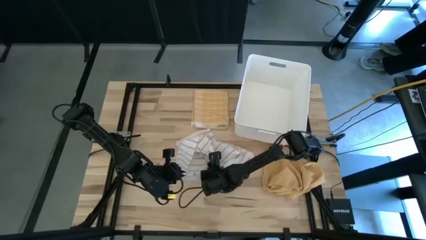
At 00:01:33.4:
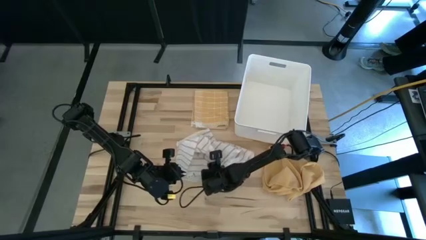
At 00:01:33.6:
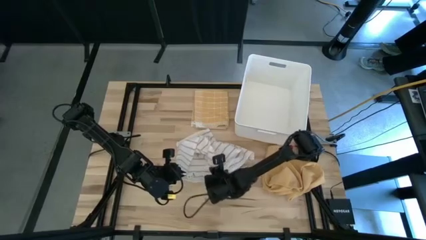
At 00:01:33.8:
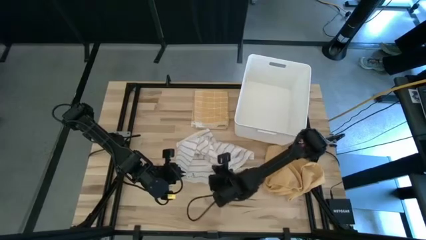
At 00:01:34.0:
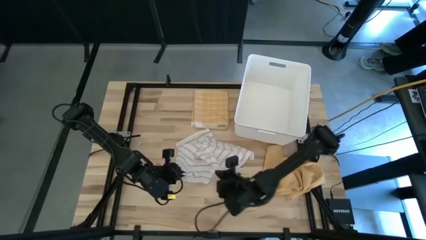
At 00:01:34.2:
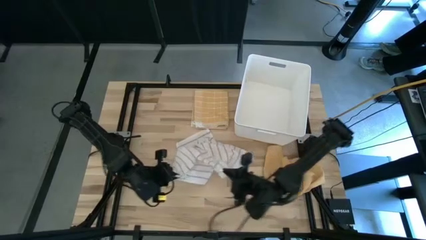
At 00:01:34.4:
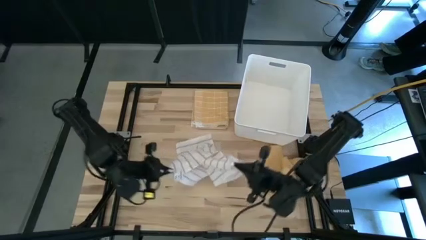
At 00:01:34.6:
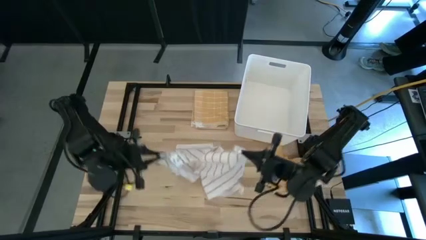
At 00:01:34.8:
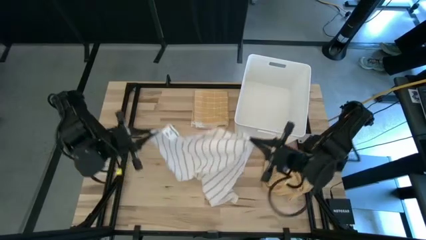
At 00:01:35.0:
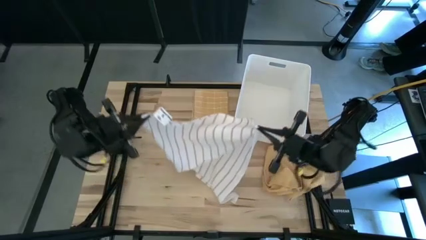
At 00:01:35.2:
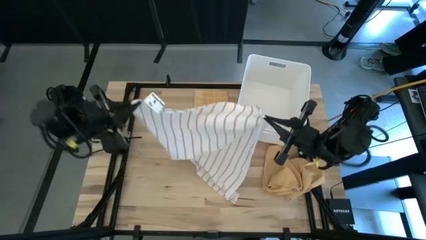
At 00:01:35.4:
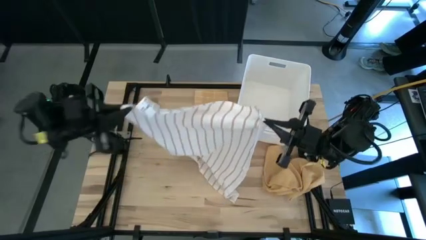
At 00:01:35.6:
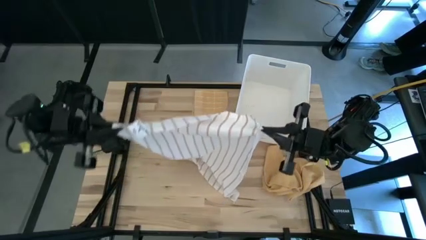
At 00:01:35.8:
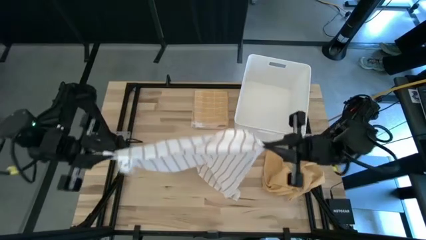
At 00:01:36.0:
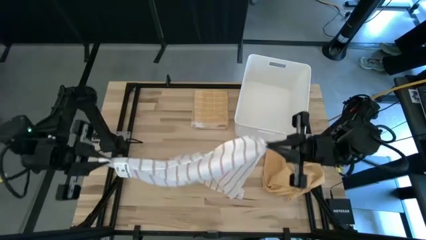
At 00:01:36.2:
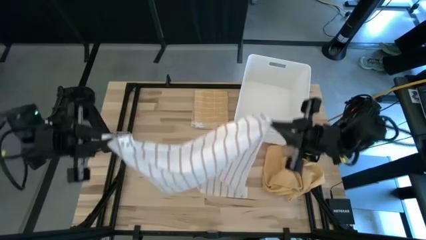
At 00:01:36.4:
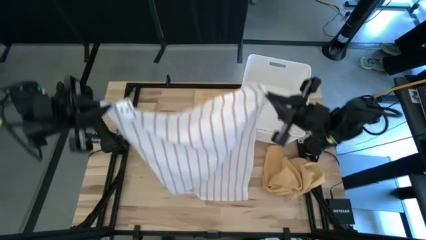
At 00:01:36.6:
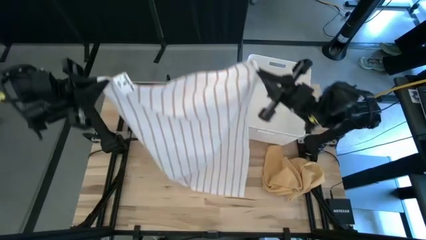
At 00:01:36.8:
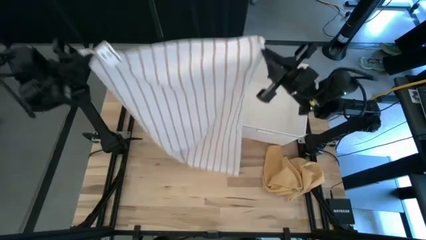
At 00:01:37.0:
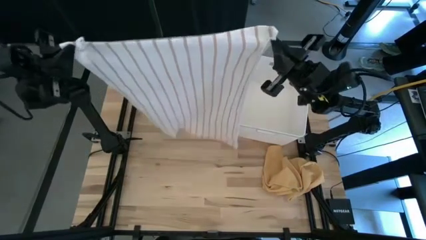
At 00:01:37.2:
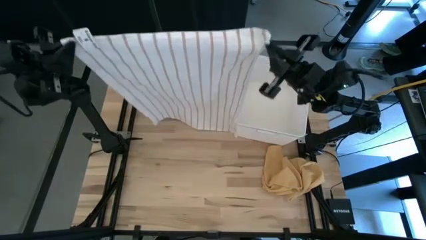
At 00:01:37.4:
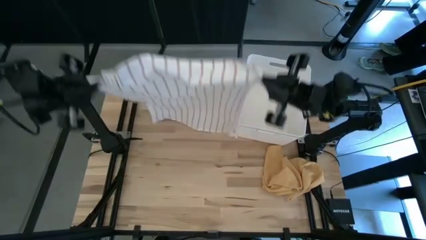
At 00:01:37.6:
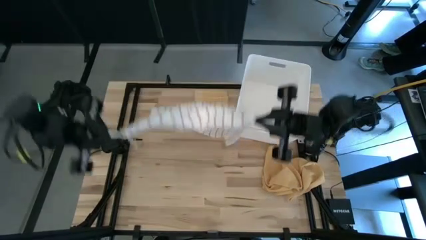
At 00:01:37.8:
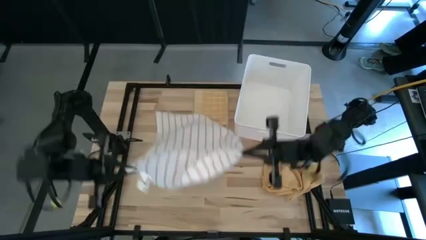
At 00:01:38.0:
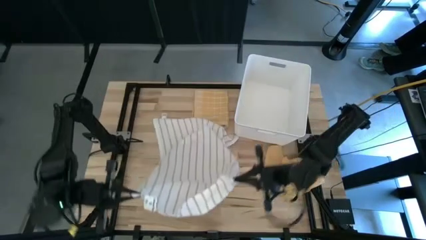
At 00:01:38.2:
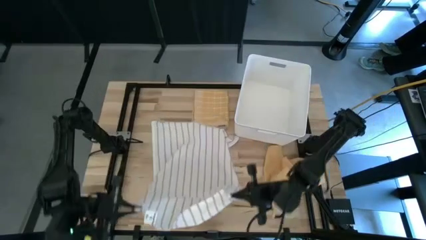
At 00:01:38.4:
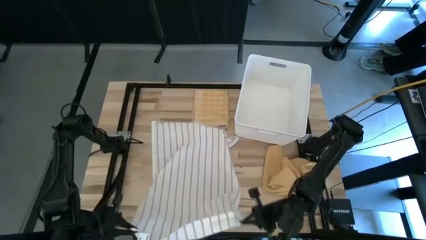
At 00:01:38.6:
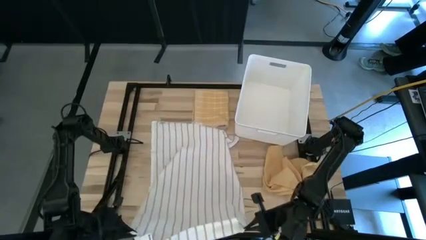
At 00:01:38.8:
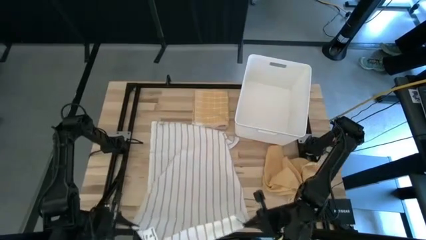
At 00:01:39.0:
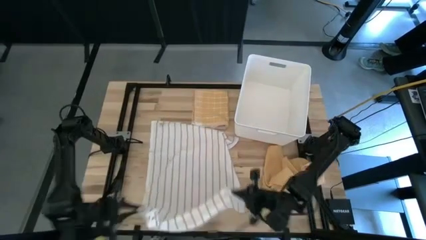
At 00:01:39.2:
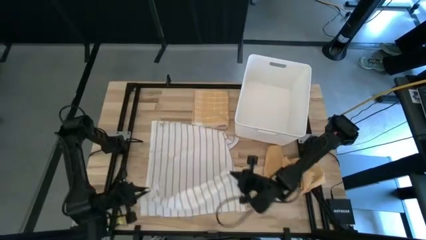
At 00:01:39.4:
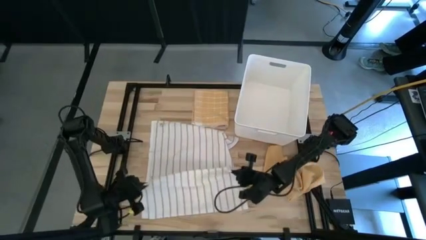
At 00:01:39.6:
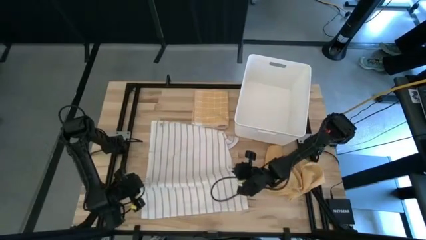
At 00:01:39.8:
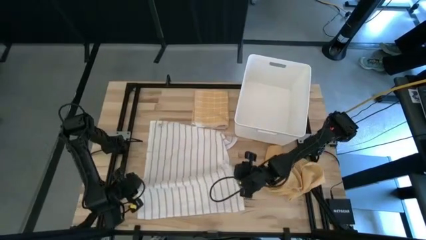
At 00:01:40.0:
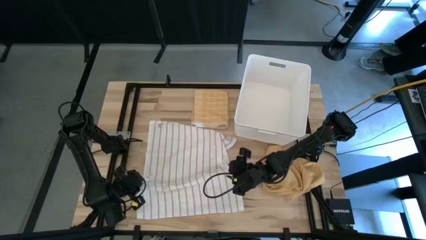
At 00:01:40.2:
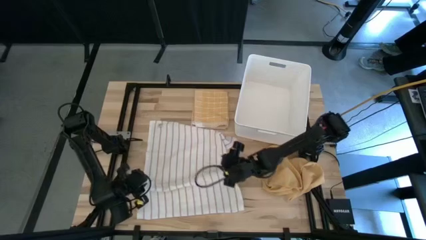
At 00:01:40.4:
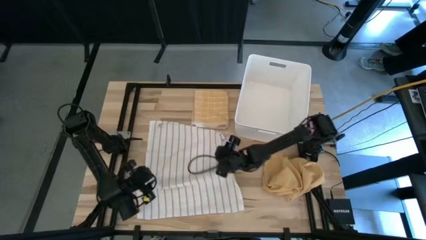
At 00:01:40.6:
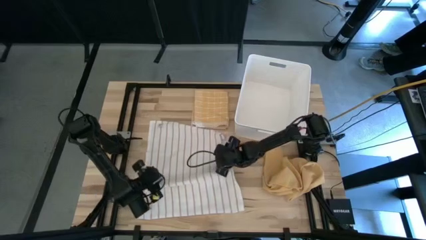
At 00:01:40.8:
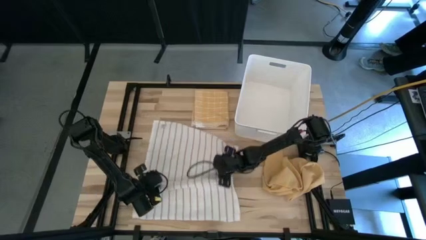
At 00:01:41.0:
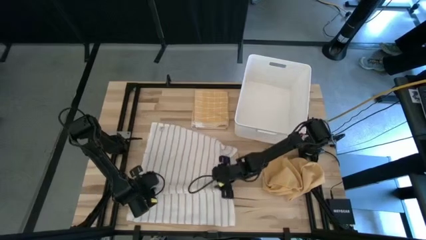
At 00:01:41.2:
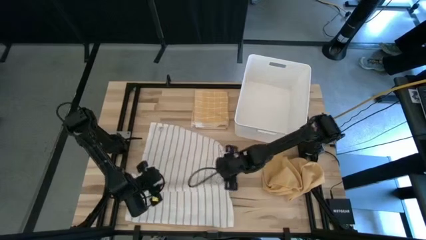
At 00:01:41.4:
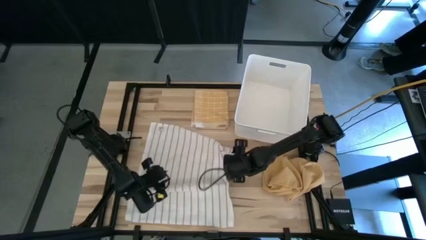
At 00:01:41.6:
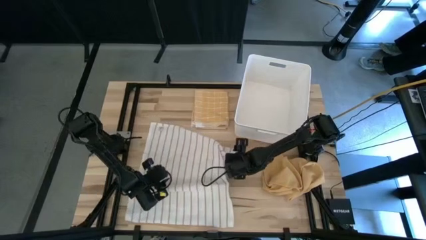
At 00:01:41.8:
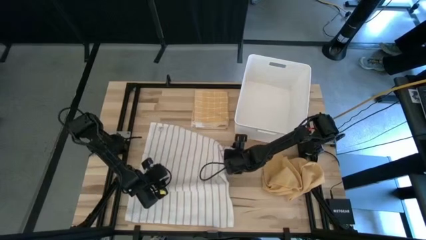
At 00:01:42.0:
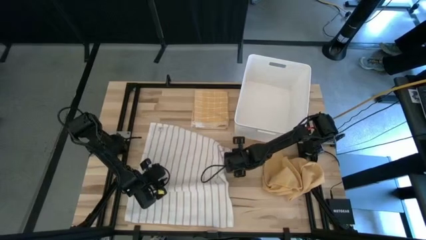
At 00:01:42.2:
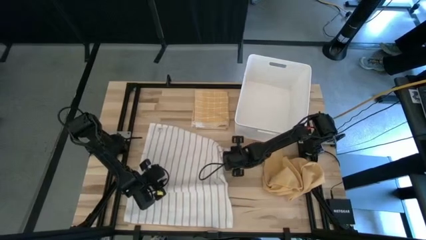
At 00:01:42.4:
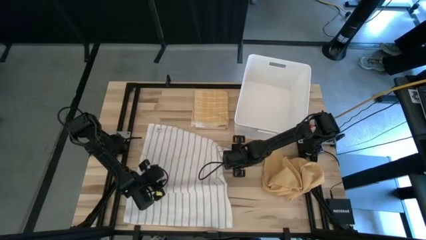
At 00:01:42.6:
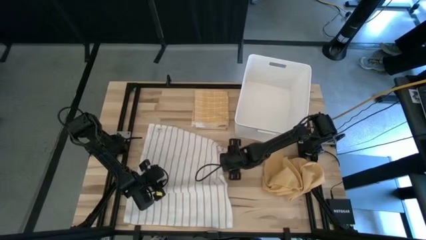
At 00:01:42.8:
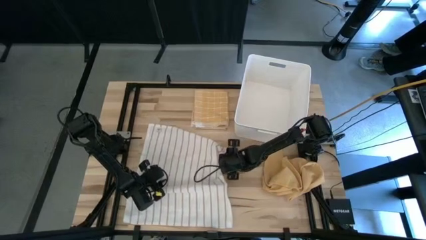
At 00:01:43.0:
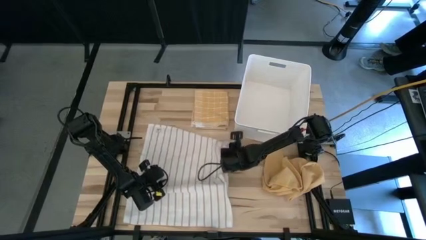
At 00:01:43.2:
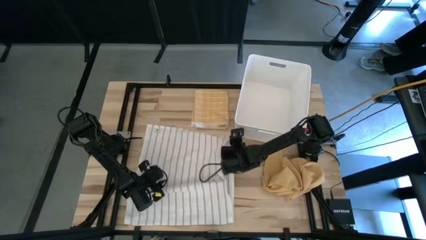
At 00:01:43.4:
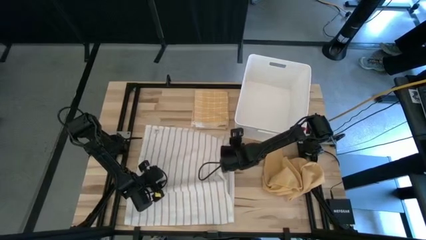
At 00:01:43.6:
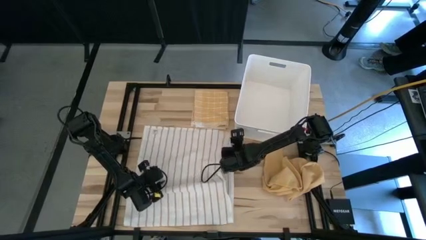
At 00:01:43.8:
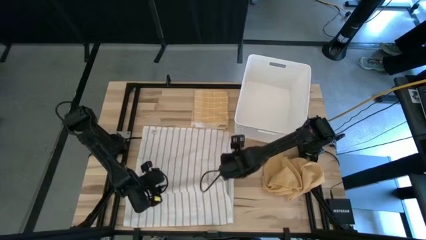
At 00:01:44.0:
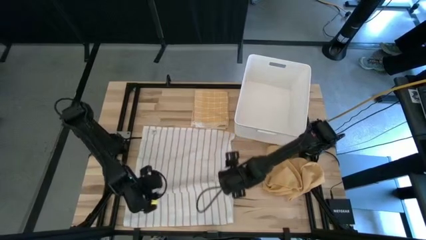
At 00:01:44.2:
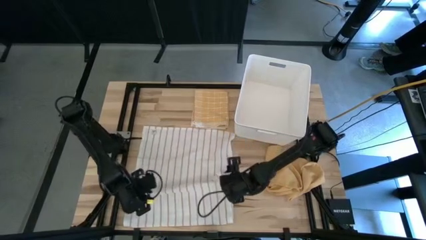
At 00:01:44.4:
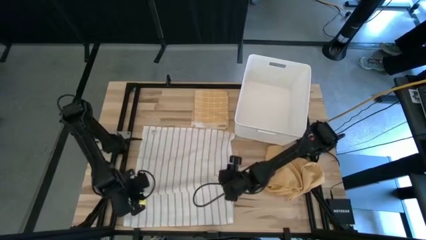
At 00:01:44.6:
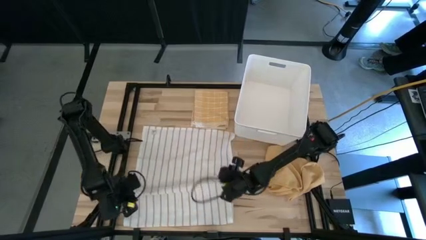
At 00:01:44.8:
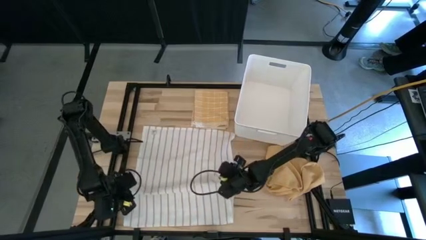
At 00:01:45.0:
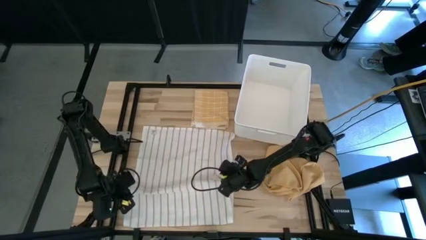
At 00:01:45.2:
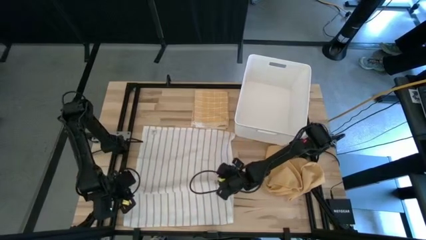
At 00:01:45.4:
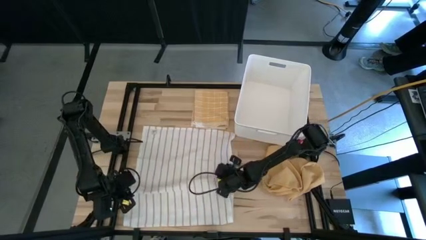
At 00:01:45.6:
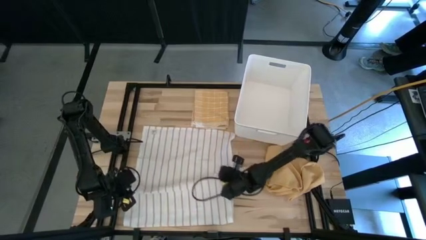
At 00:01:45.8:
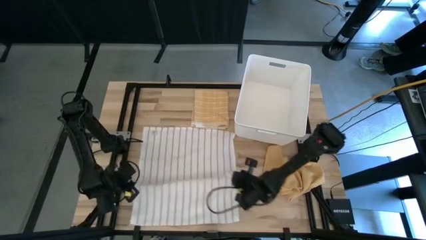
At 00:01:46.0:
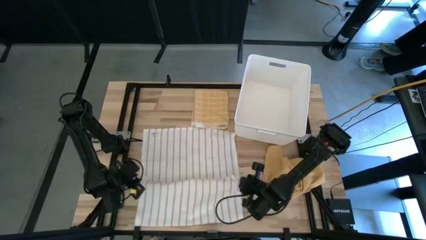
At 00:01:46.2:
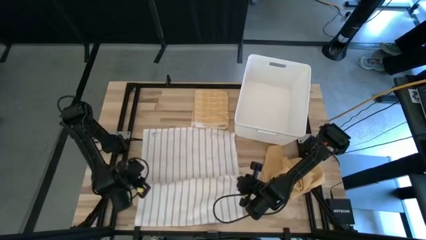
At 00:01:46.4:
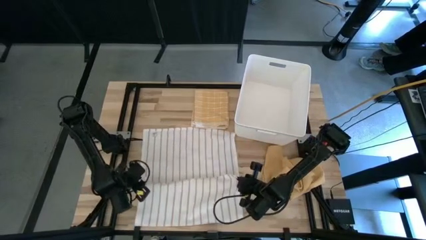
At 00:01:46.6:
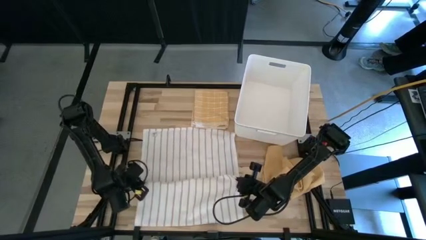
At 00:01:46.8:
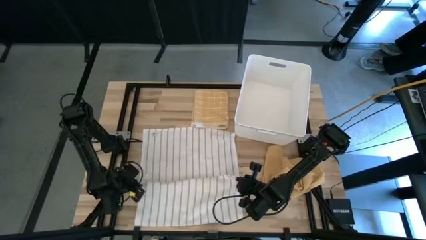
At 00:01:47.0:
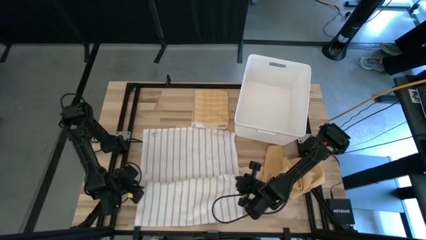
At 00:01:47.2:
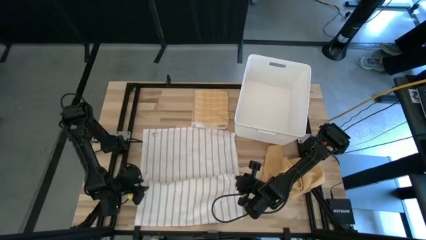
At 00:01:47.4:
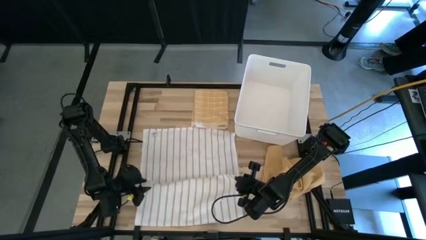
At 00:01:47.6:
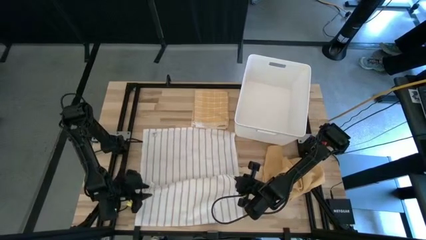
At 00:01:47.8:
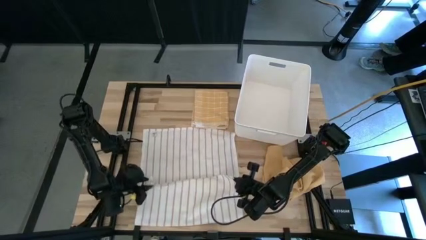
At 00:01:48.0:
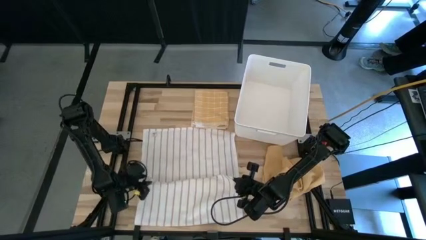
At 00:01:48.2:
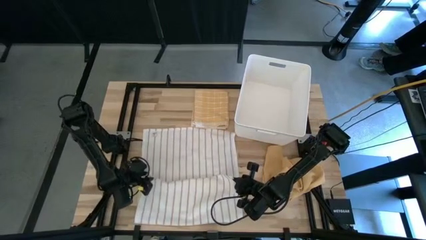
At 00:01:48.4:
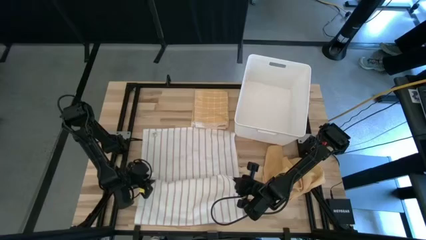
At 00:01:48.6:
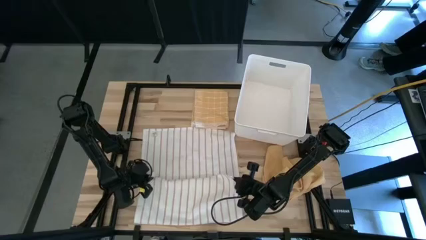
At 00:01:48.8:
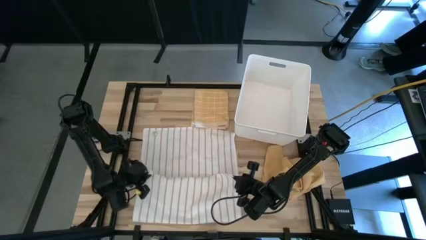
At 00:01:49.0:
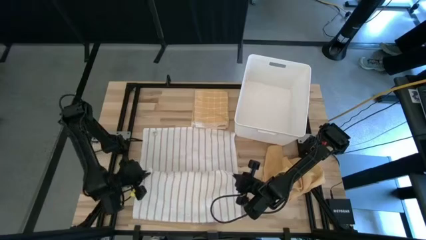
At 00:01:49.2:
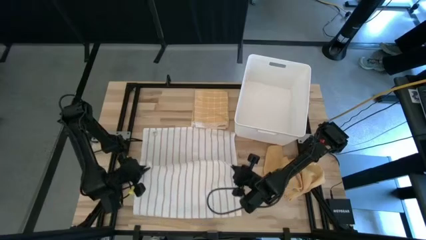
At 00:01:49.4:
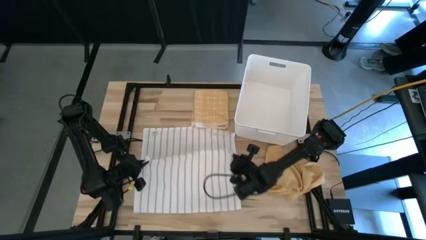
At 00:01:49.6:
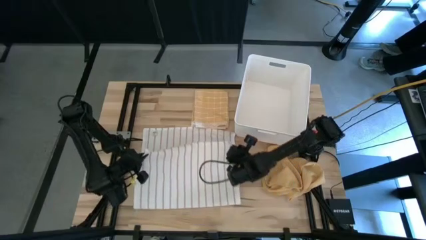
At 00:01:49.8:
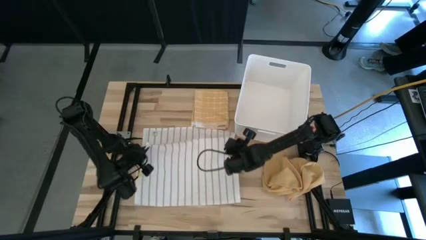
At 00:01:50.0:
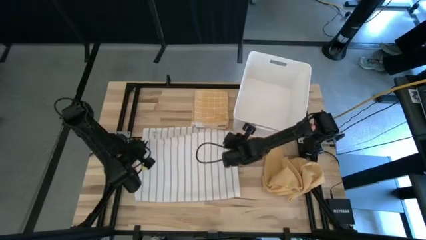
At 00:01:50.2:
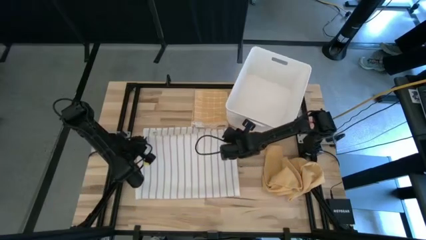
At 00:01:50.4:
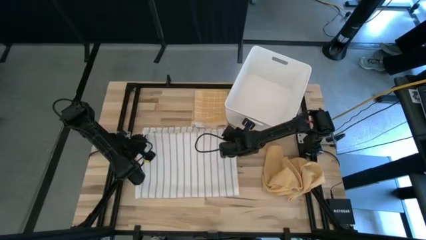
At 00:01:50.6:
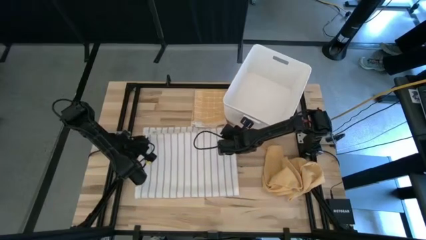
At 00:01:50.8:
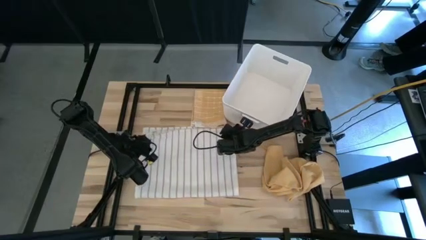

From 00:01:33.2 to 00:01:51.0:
Task: Fold towel
Fold the white towel
